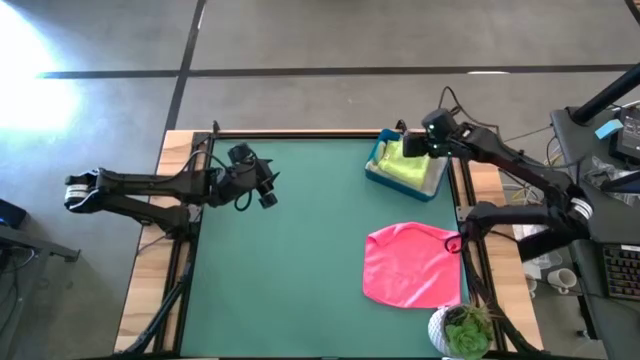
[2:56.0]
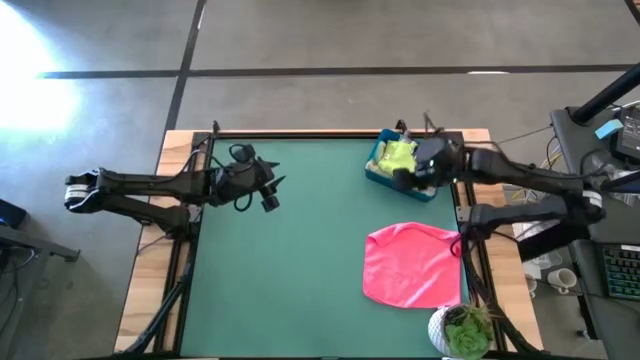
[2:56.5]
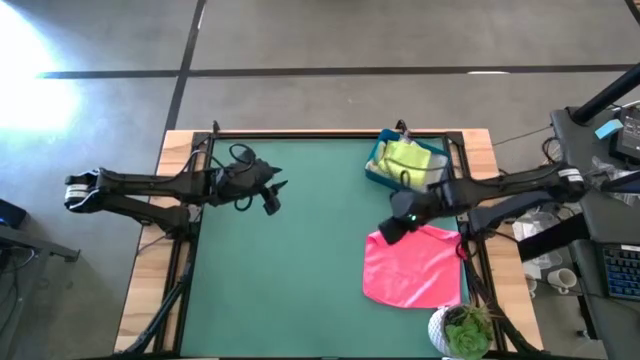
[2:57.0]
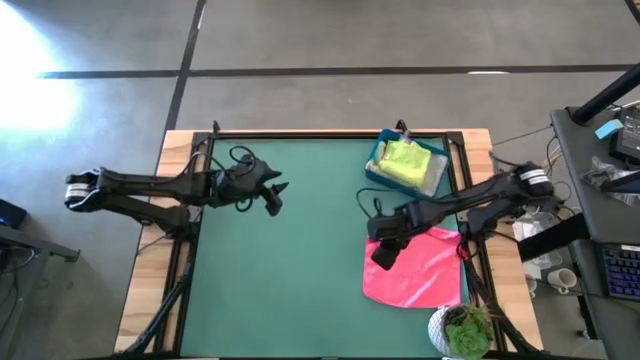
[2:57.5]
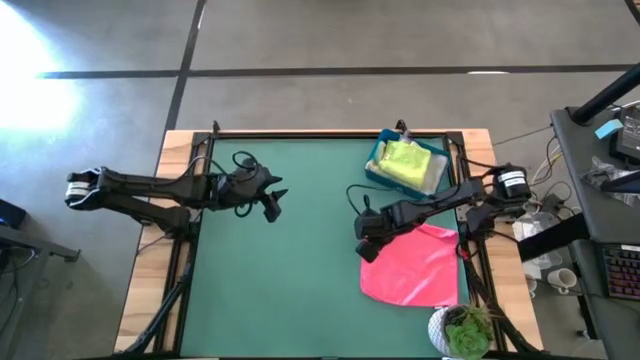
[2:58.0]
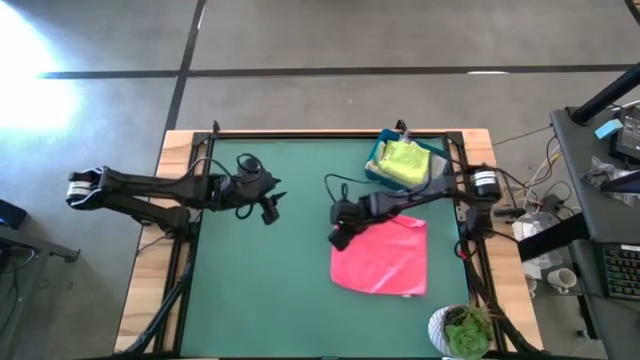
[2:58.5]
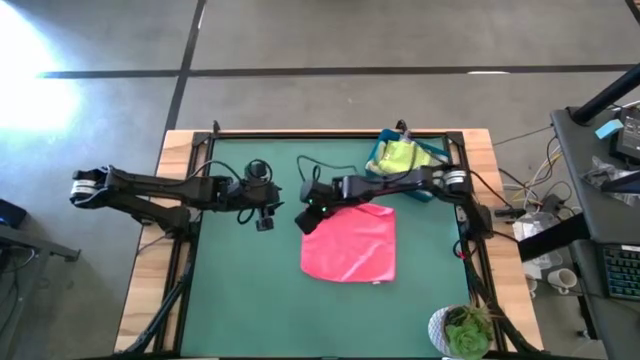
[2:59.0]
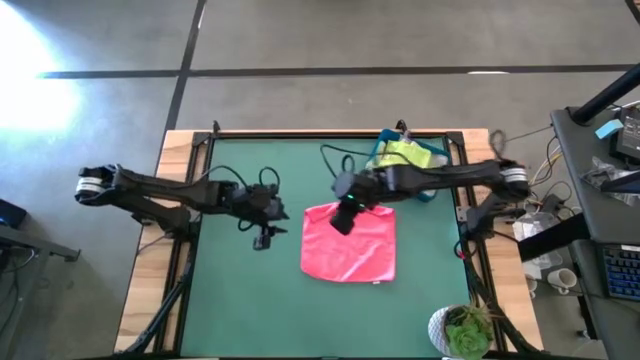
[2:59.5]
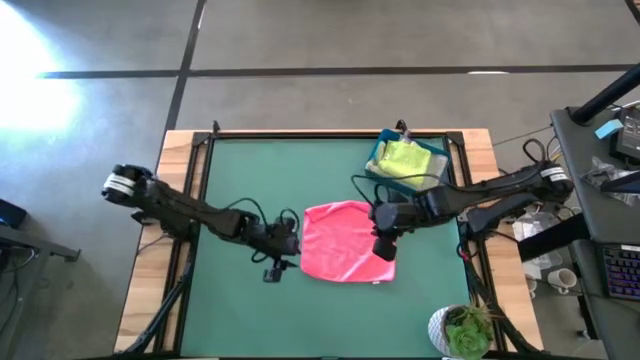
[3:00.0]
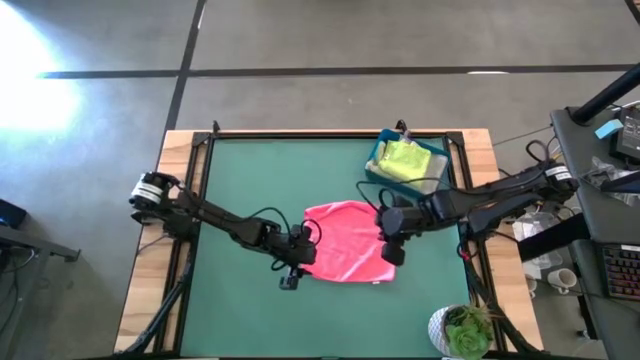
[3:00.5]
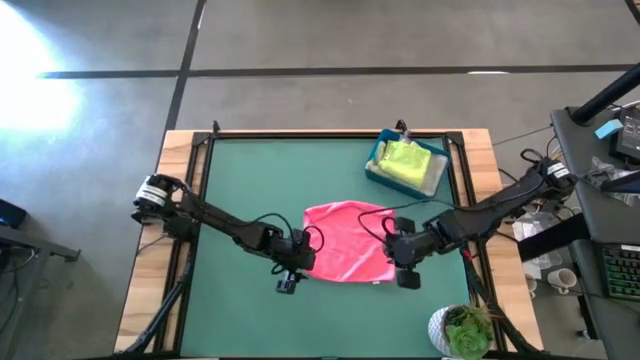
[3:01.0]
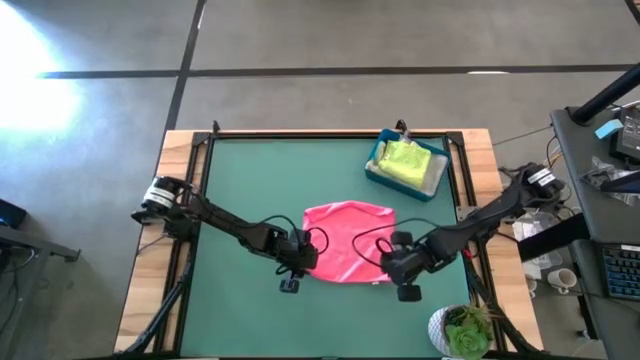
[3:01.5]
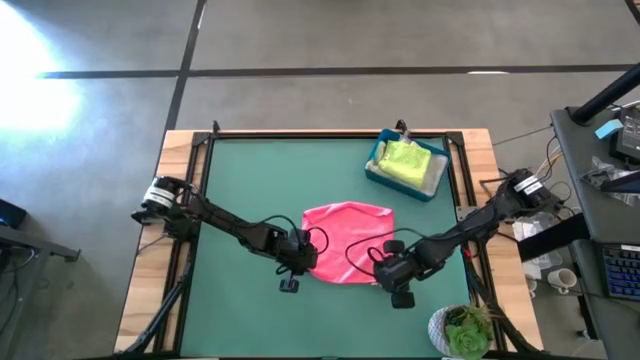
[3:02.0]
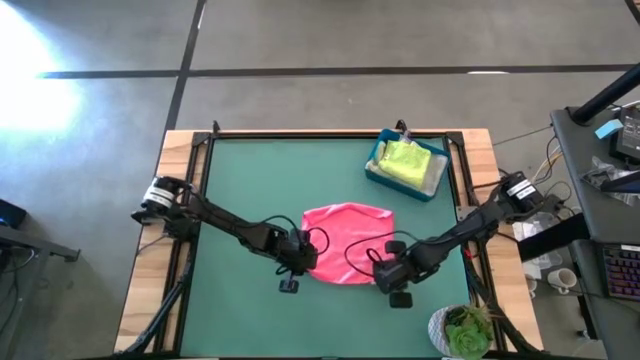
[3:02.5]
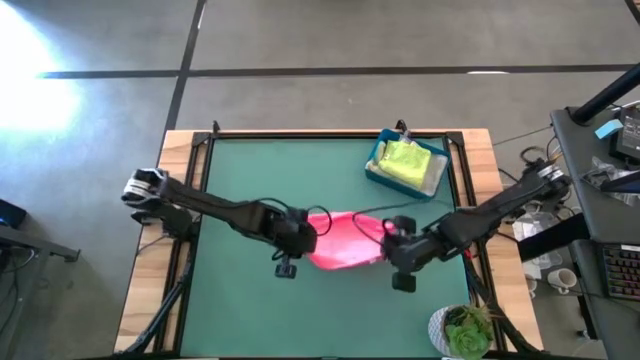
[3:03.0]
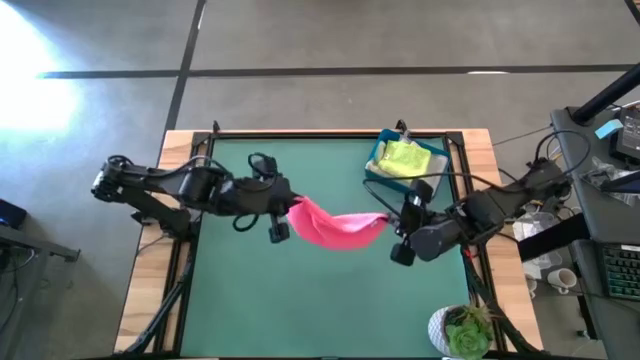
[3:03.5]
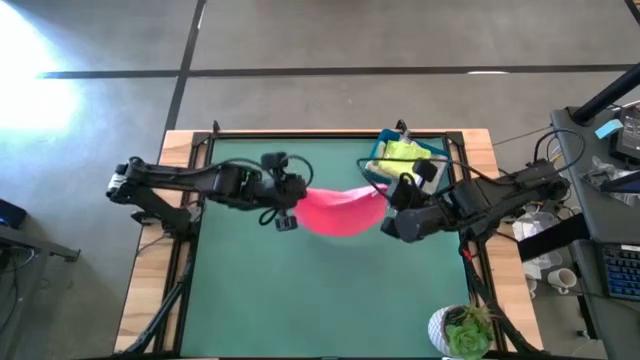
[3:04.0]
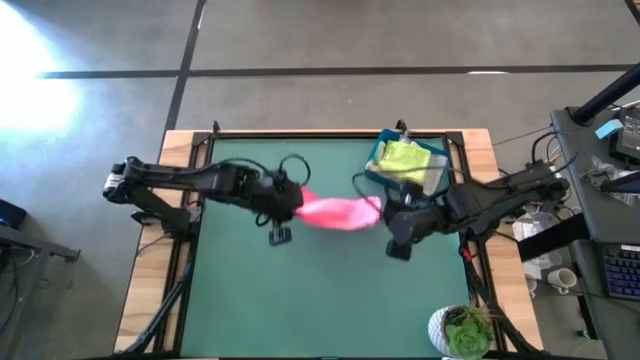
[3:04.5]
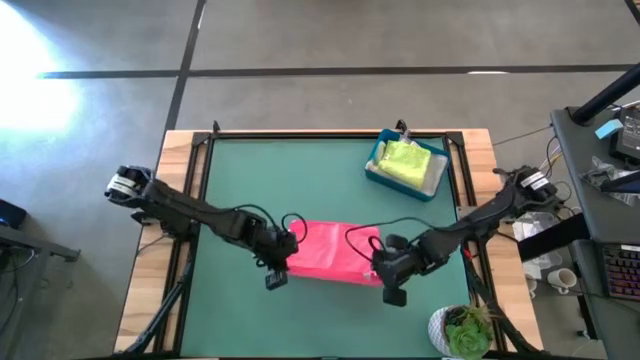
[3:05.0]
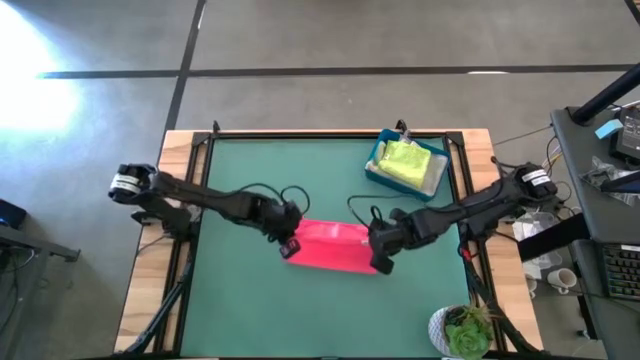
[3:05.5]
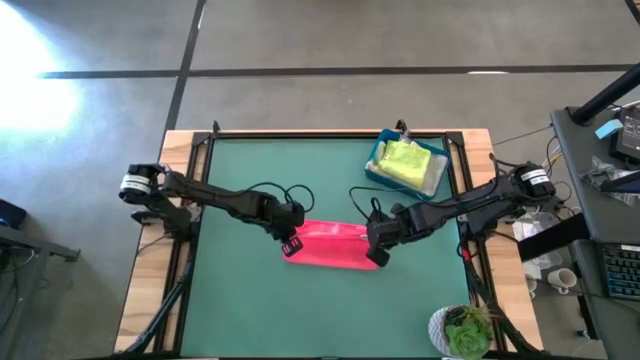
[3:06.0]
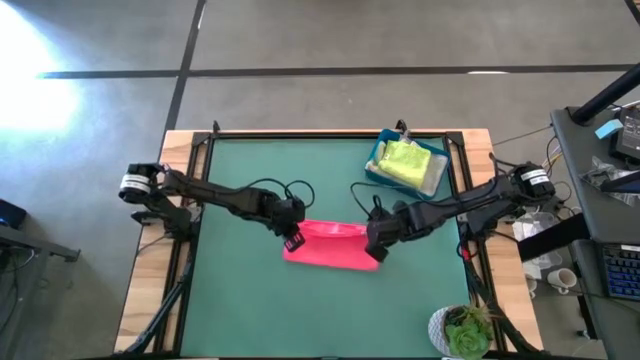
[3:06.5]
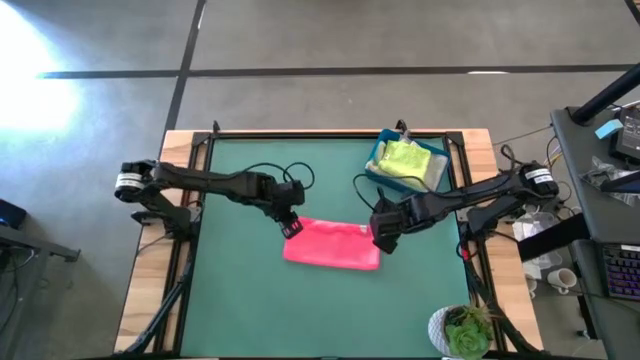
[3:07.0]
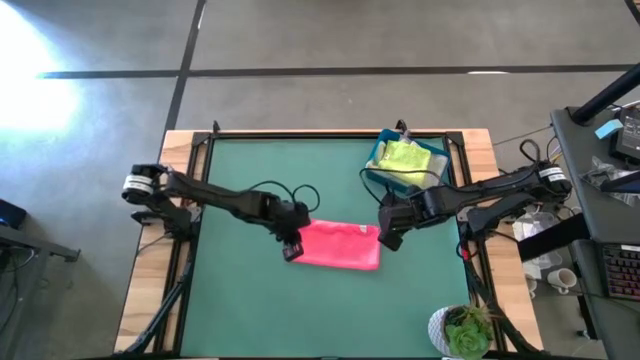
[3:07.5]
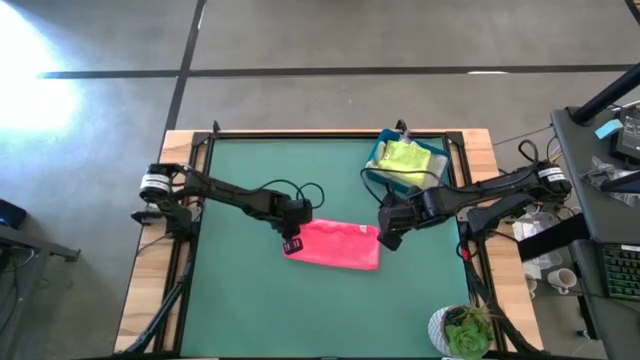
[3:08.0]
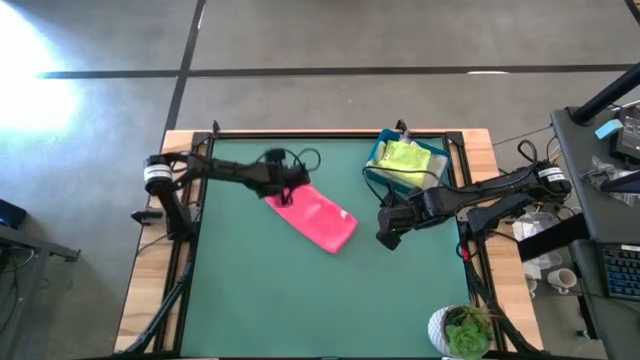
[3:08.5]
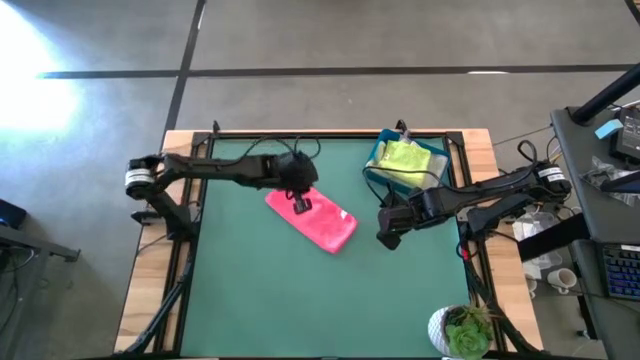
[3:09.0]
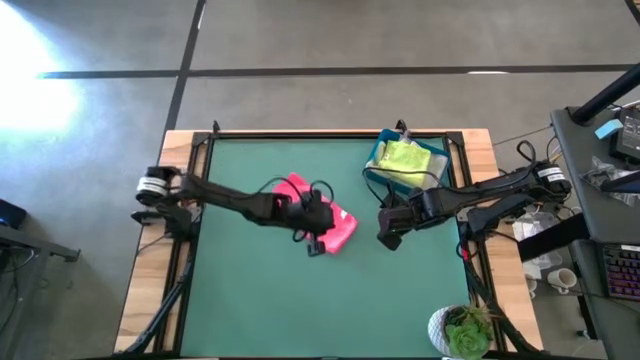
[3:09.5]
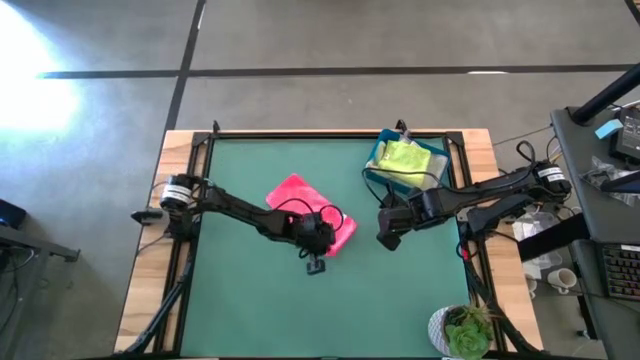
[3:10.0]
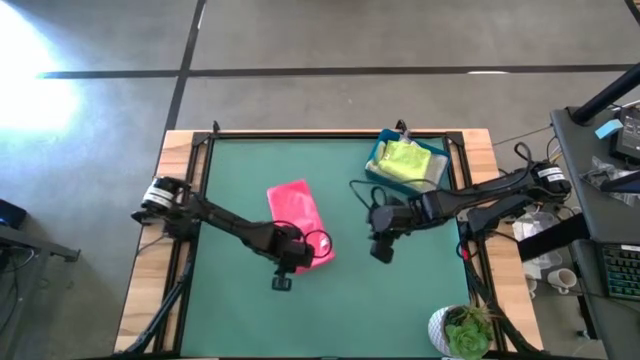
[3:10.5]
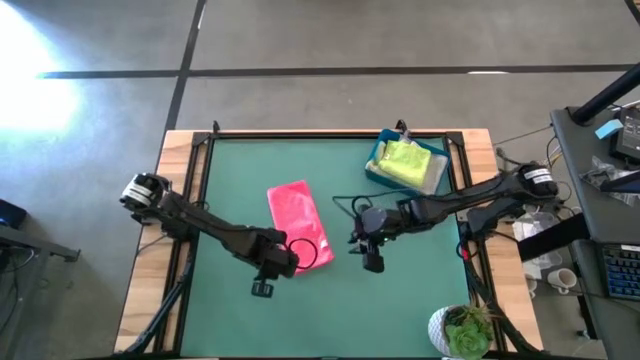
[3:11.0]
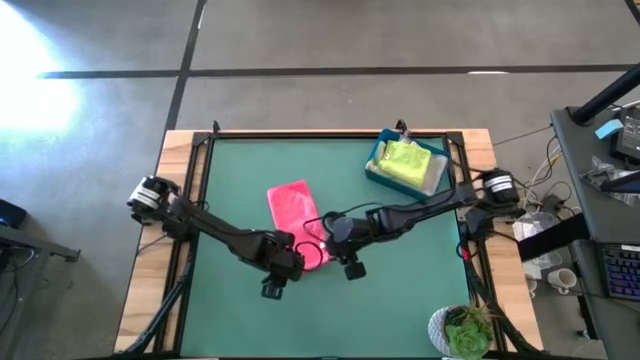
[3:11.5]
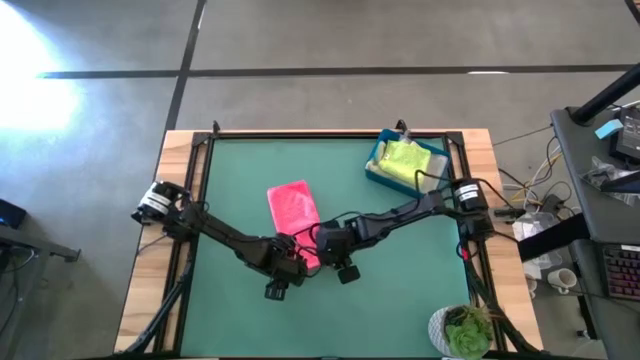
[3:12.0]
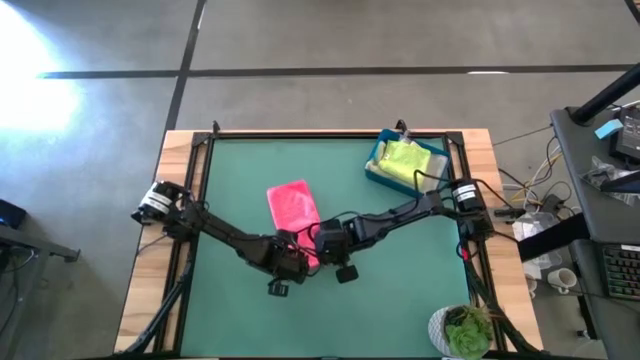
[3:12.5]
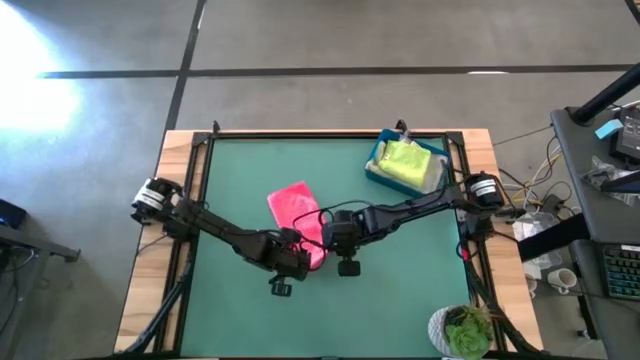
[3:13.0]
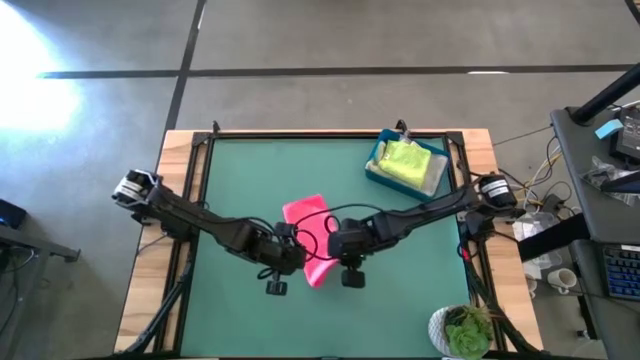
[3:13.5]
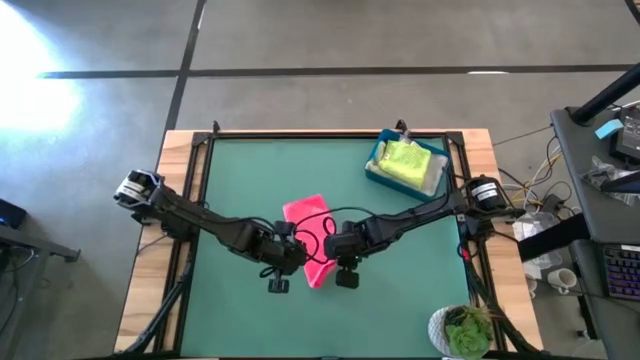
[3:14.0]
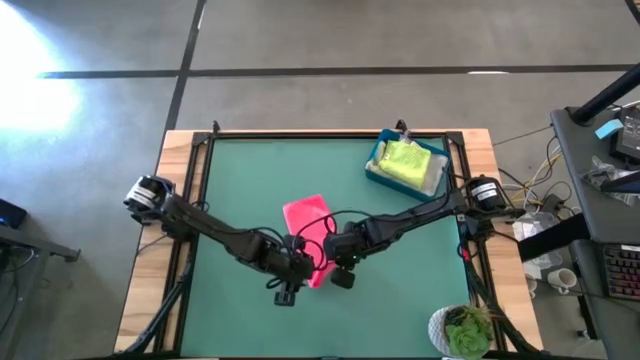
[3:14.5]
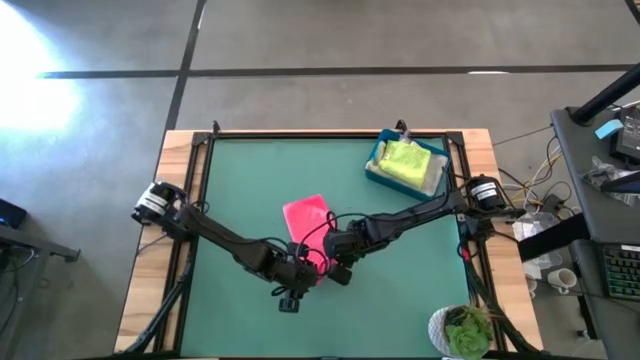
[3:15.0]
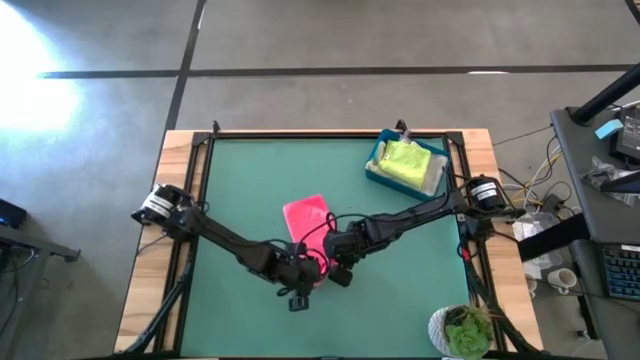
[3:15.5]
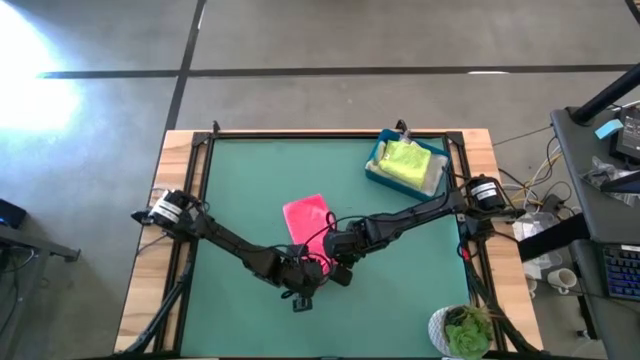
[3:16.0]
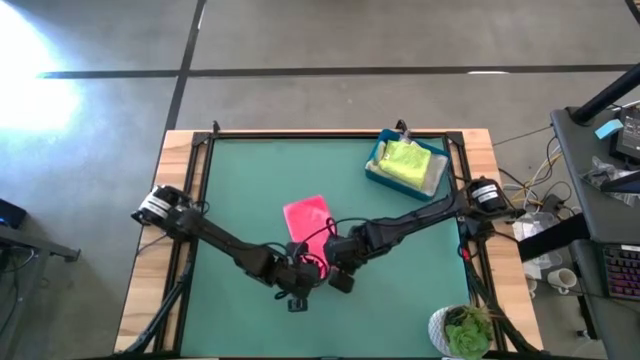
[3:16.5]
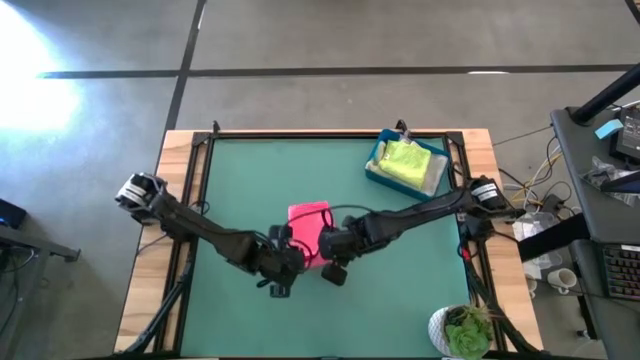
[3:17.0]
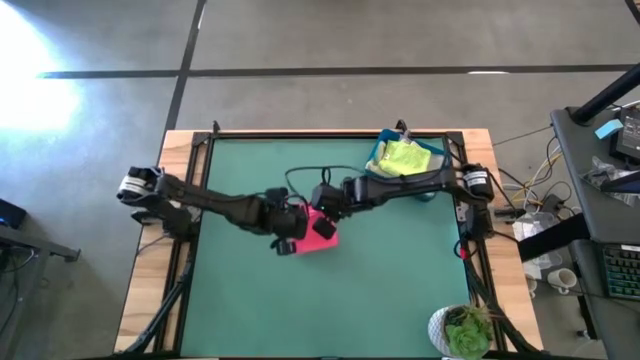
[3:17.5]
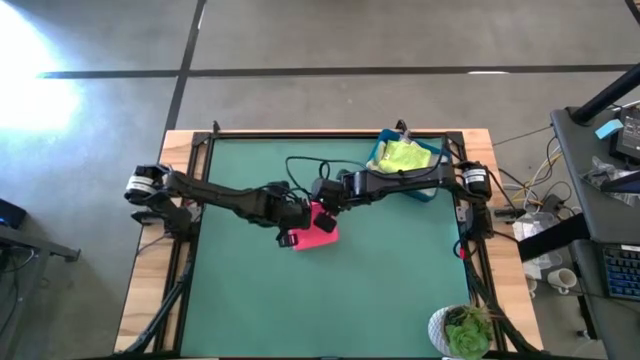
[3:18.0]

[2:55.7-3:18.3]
Task: Fold microfiber towels
Fold the pink microfiber cloth
